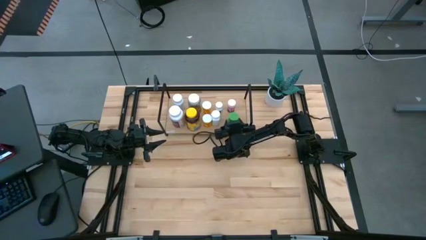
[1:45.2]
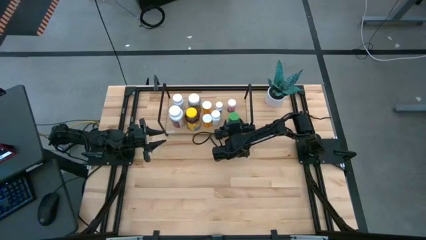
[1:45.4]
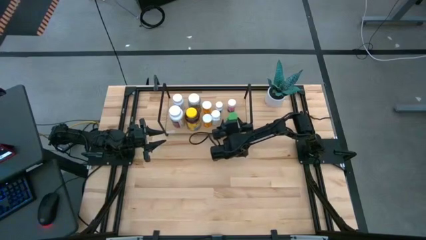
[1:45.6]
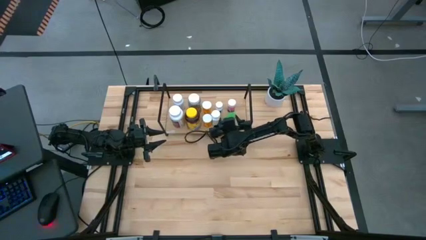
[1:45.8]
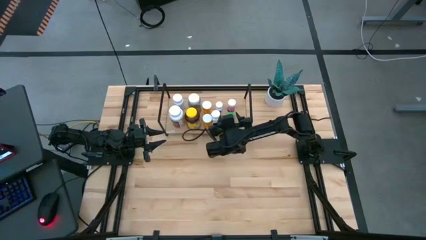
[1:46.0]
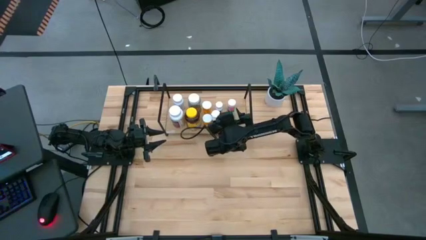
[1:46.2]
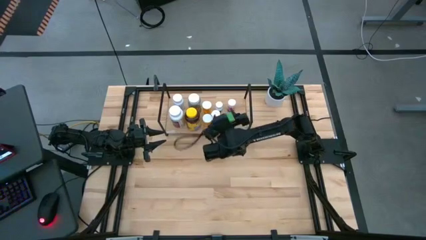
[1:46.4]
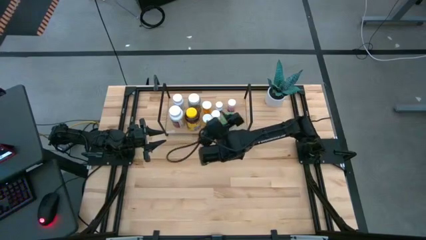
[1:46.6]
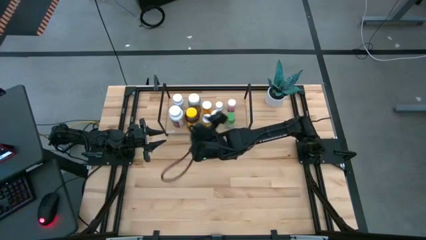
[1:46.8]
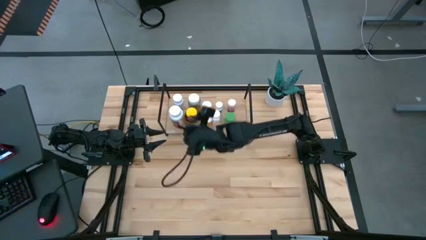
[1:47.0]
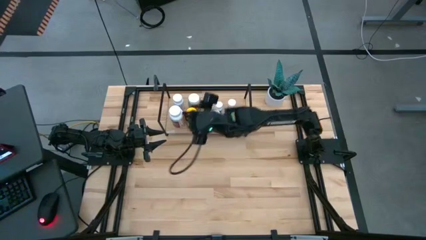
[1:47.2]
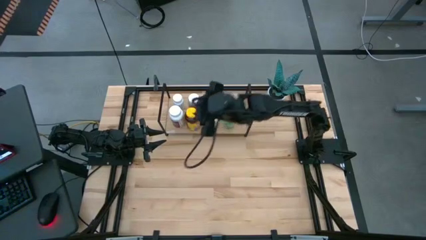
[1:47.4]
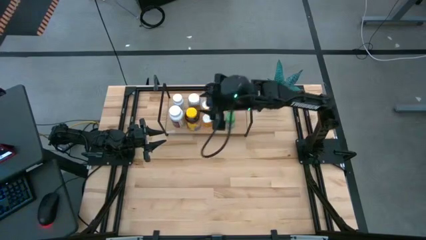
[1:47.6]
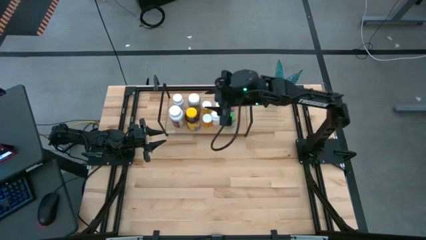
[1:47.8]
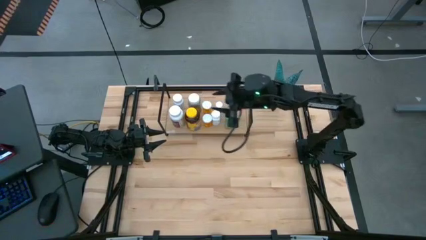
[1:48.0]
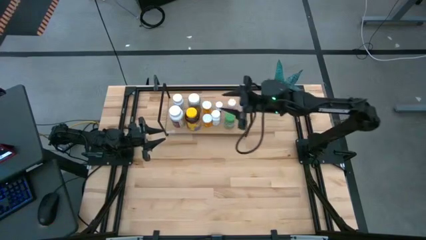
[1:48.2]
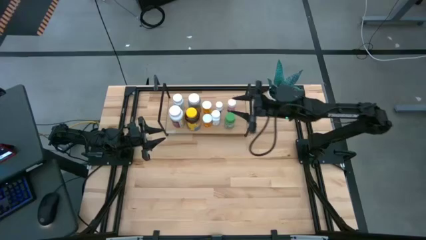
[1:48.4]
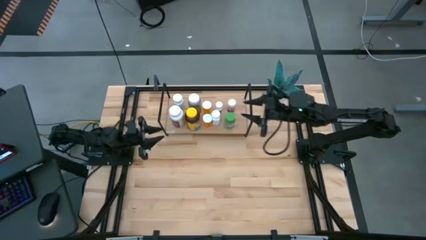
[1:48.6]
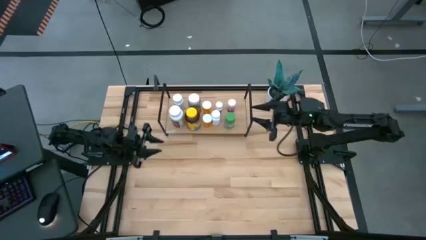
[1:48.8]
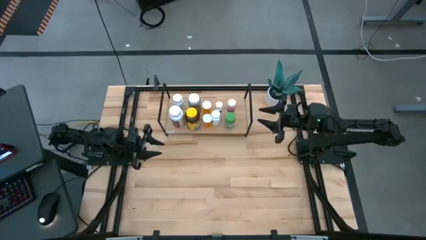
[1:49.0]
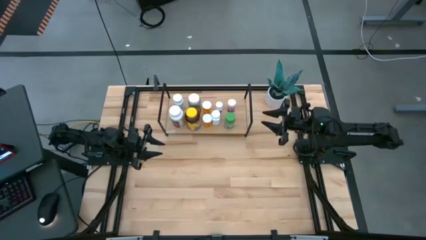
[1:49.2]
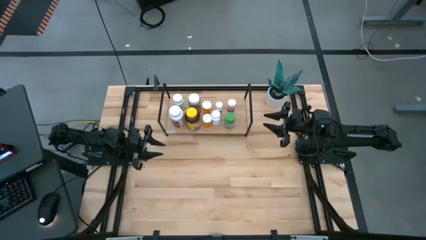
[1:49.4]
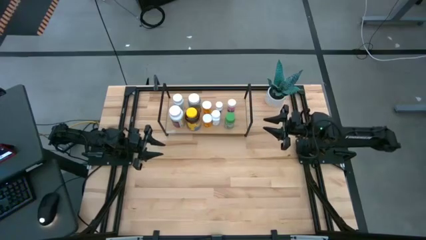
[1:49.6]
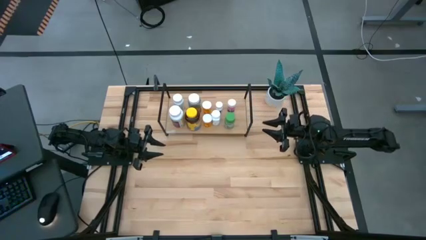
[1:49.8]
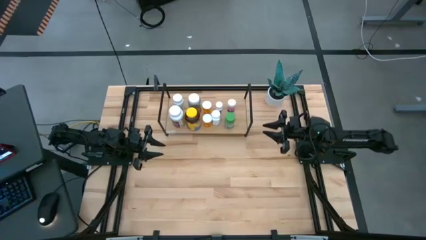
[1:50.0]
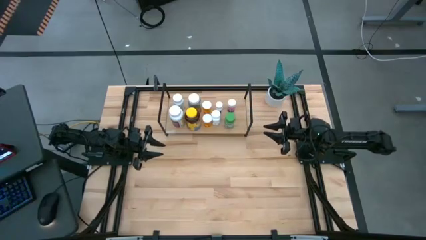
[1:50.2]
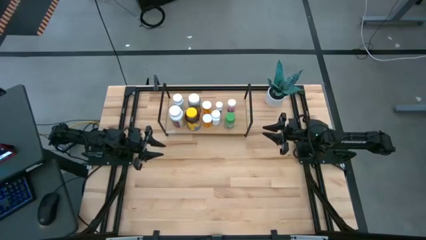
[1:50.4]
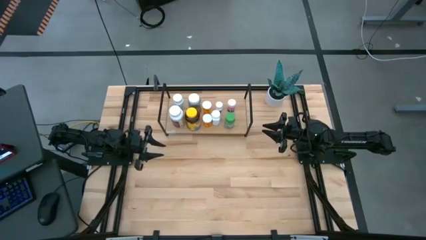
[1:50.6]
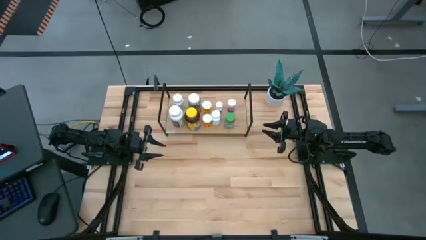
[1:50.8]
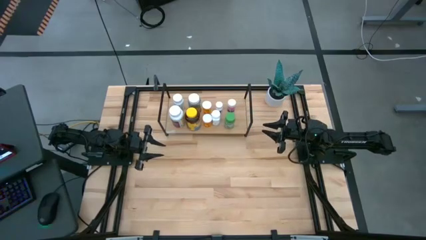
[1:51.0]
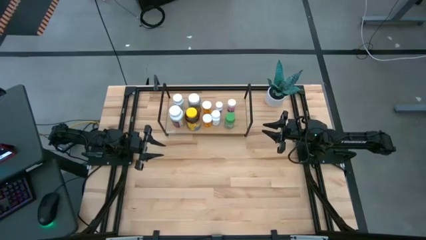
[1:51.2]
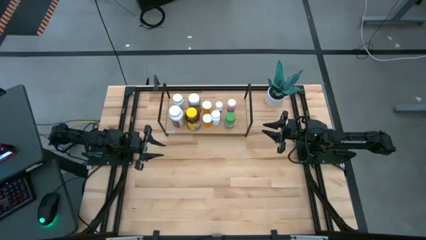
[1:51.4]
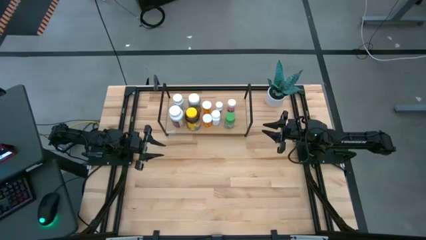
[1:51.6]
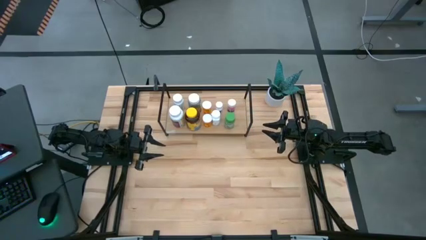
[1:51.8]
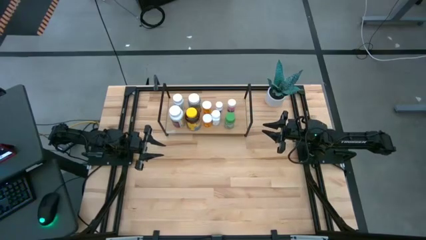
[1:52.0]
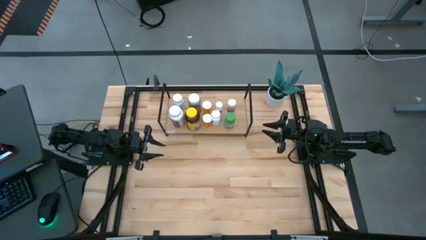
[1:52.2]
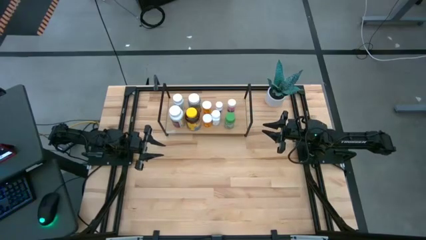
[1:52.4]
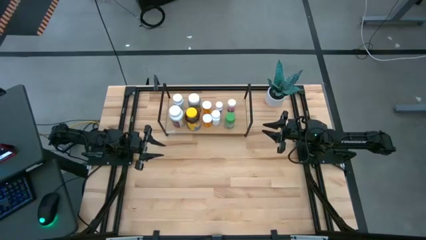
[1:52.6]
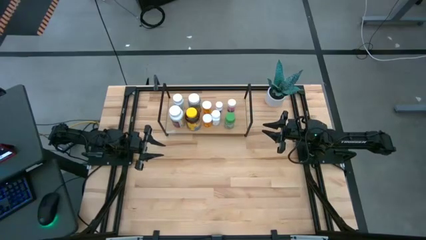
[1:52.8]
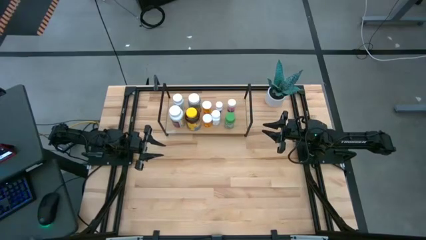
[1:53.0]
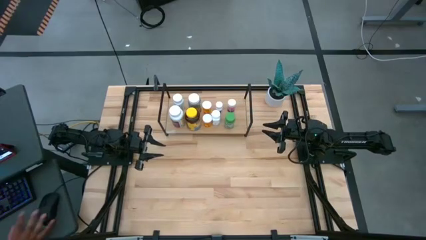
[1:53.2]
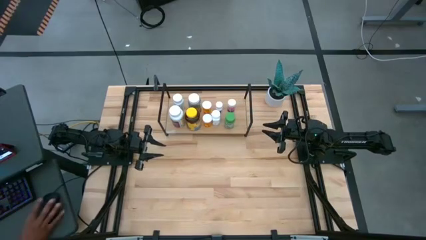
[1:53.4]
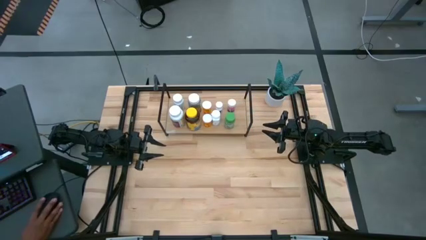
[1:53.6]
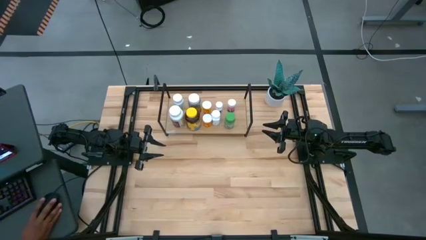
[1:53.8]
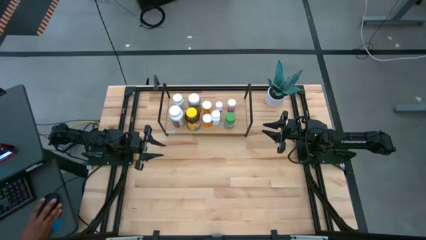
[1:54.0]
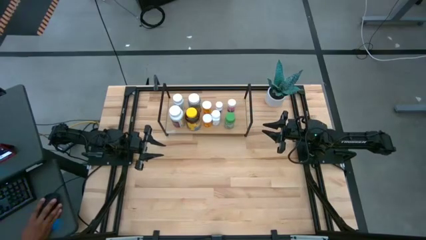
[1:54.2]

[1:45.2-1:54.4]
Task: Pick and place medicine bottles onto shelf by color
Return to Home Position

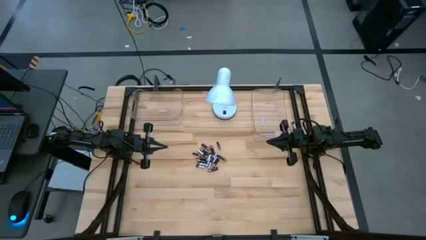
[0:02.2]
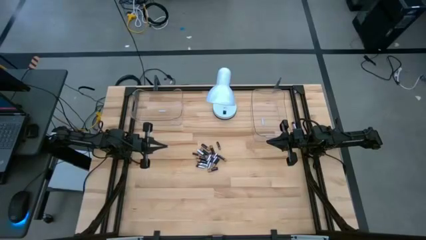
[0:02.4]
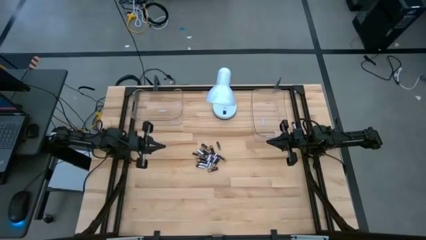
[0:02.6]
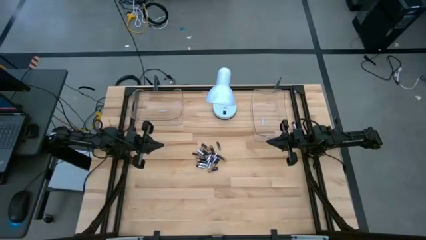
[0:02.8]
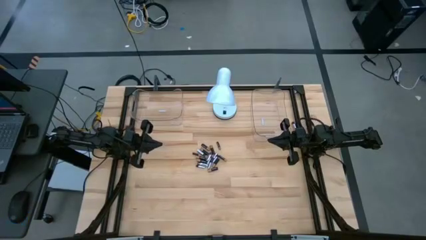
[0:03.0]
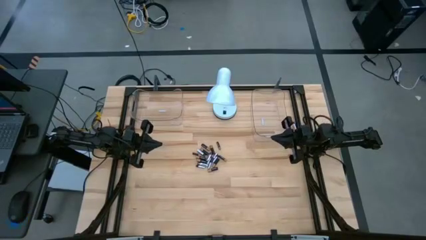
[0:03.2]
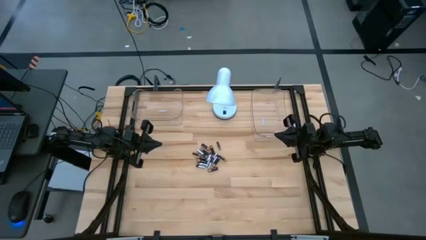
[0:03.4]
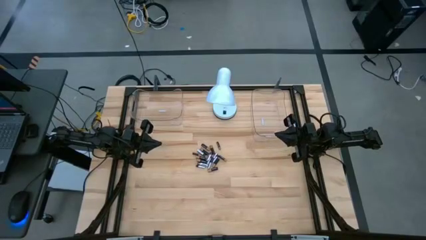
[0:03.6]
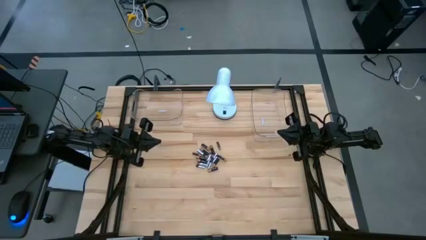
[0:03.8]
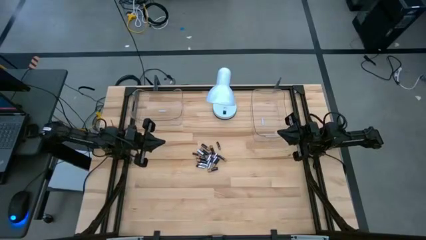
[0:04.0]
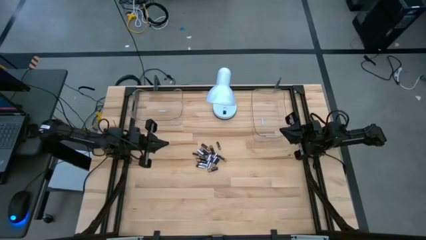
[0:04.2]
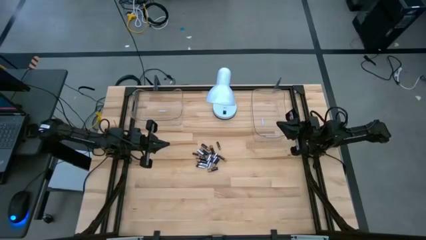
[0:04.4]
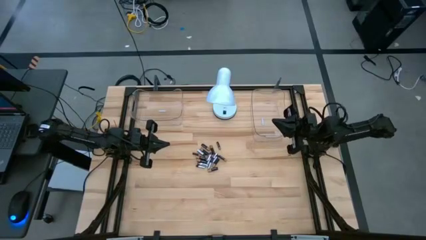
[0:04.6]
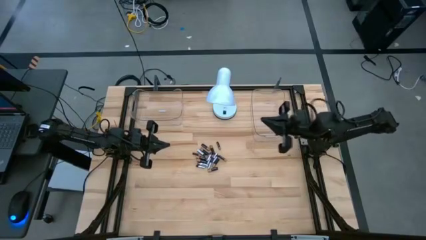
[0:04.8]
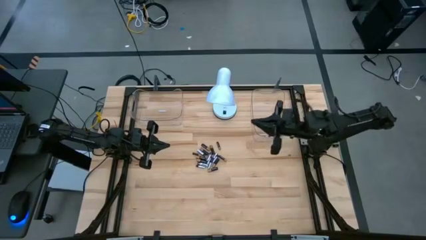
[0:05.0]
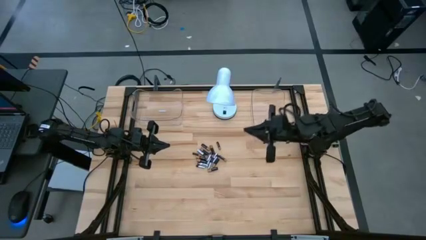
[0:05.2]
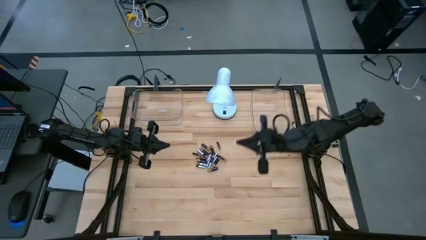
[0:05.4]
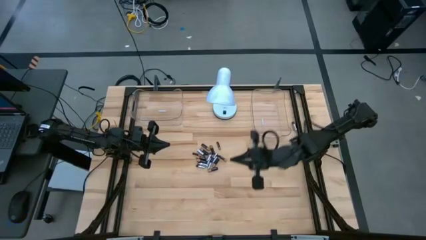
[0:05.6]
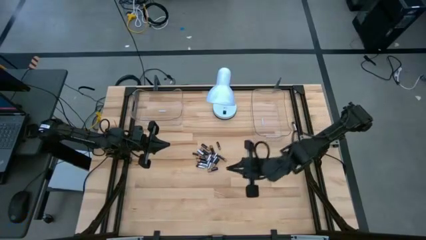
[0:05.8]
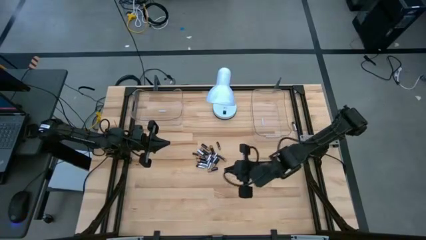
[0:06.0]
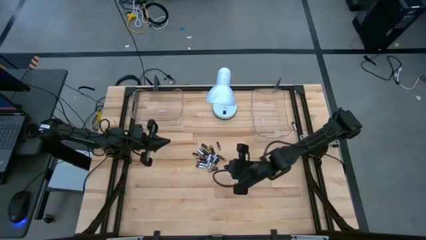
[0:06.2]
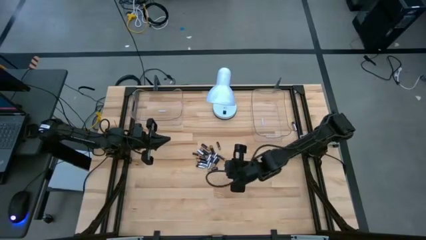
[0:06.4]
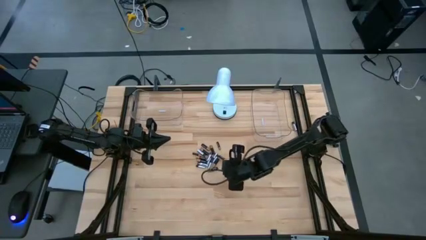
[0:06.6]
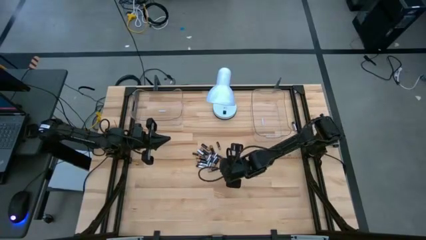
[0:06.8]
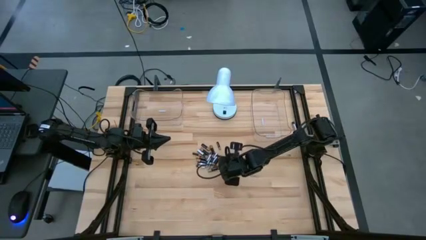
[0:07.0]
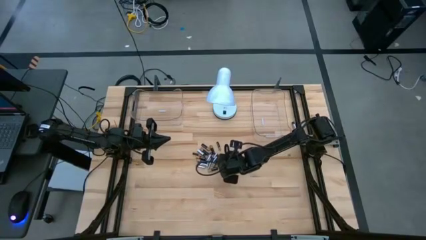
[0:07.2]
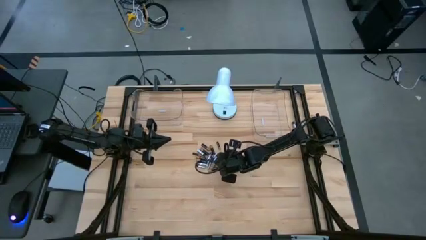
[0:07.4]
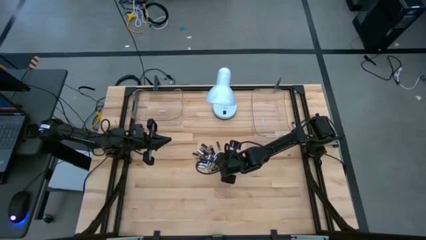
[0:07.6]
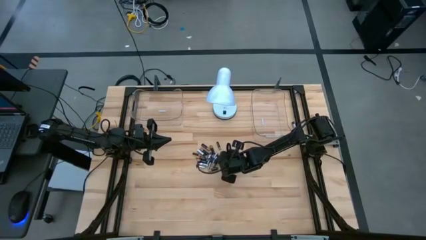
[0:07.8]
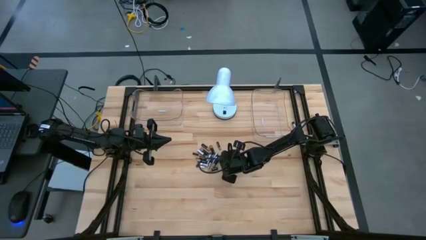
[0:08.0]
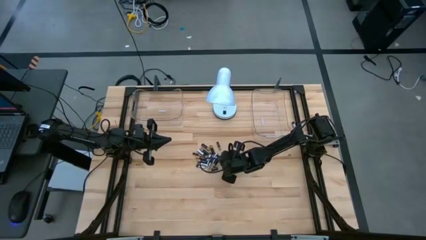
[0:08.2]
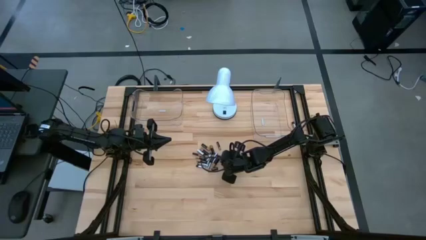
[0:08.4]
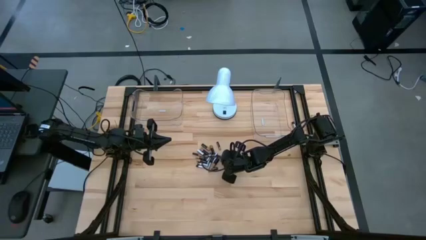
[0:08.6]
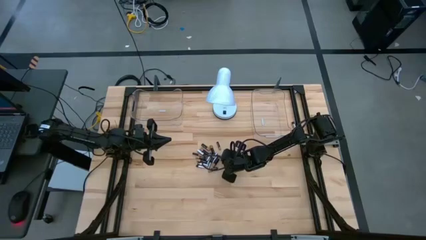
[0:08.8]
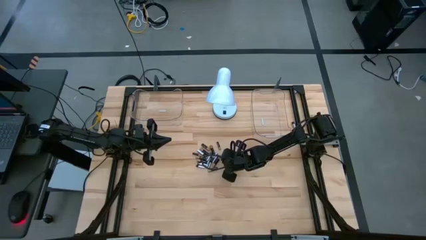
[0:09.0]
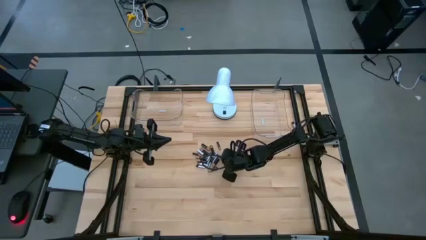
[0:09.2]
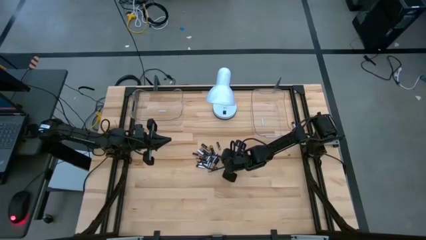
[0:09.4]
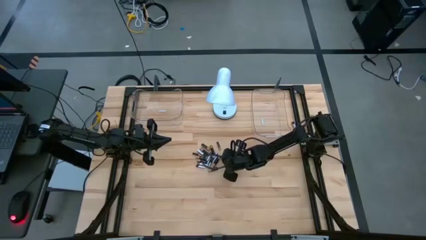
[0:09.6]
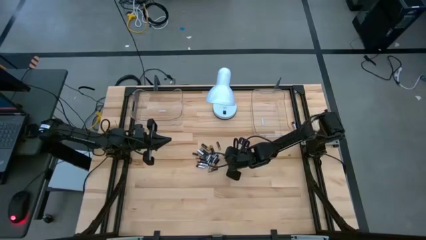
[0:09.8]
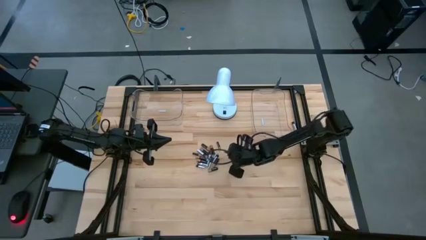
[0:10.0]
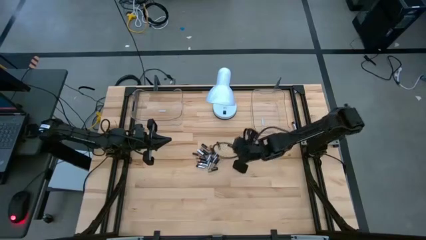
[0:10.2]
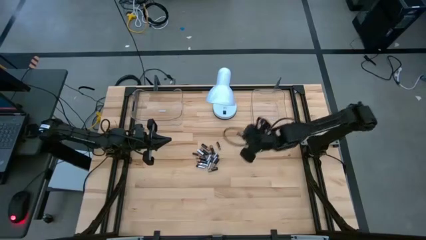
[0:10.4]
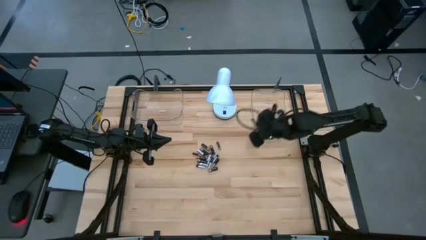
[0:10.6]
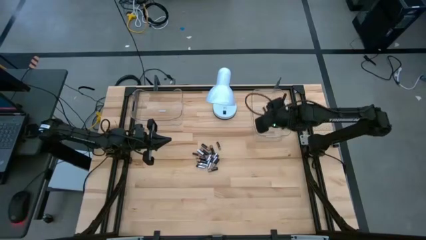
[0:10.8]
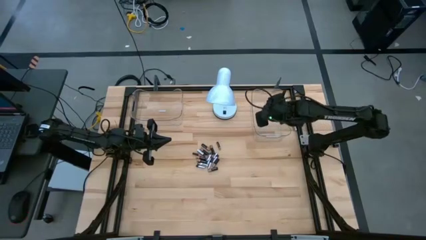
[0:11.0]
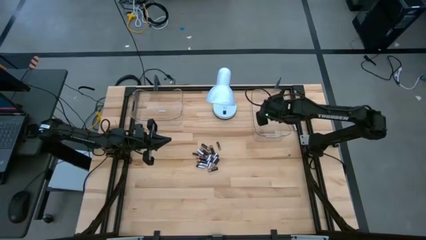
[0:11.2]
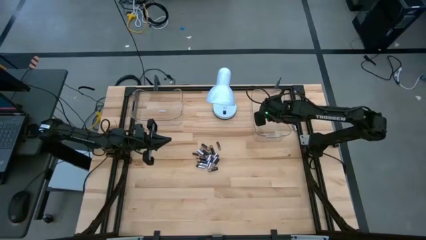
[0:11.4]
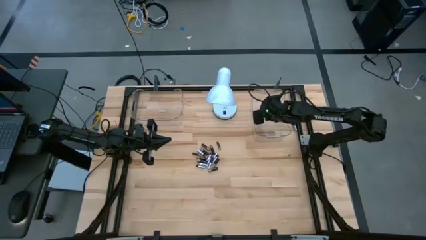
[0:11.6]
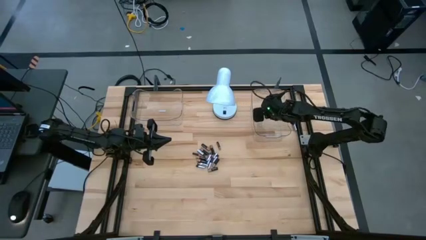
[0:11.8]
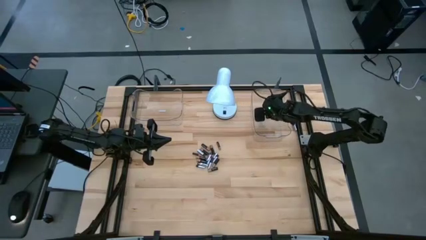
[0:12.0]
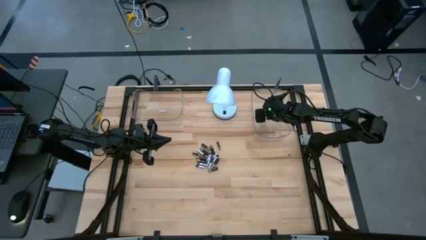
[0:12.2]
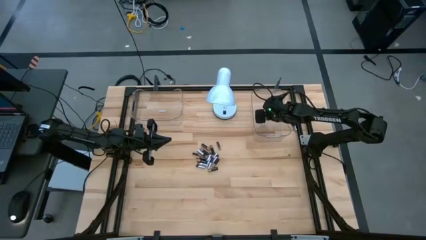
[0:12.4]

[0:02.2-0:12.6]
Task: Sort batteries
Put the black battery in the transparent bin
